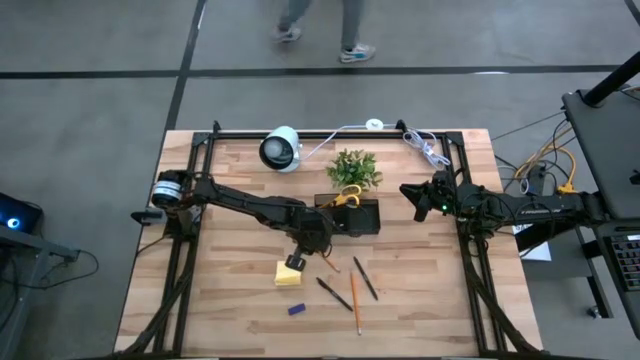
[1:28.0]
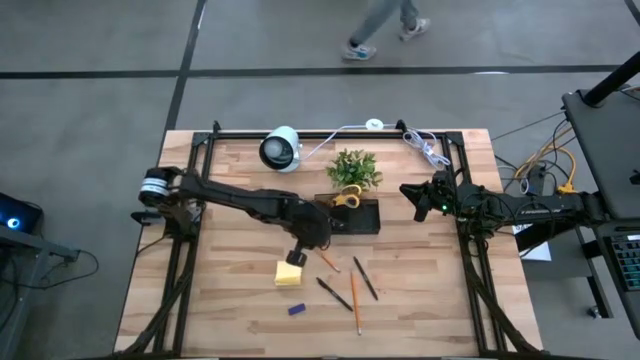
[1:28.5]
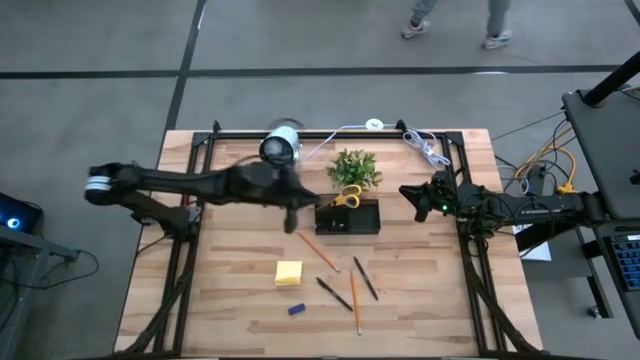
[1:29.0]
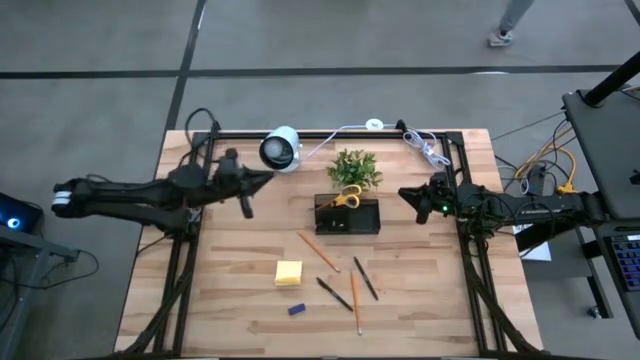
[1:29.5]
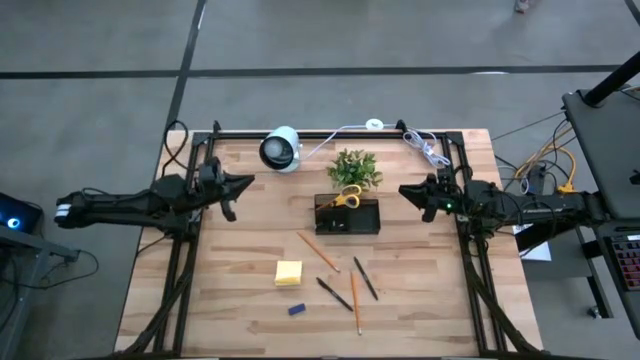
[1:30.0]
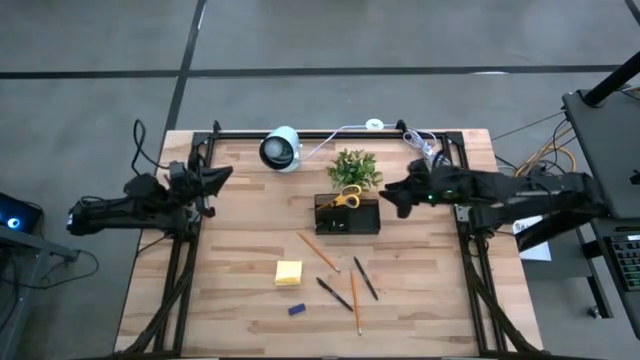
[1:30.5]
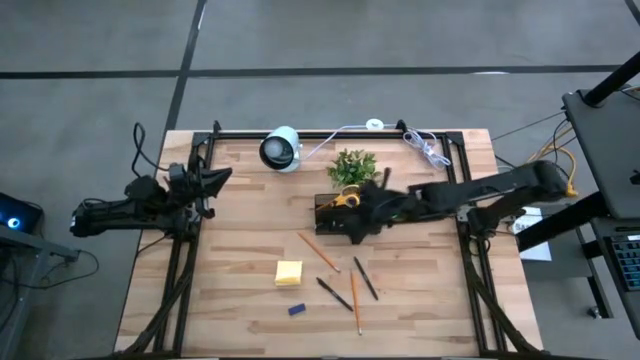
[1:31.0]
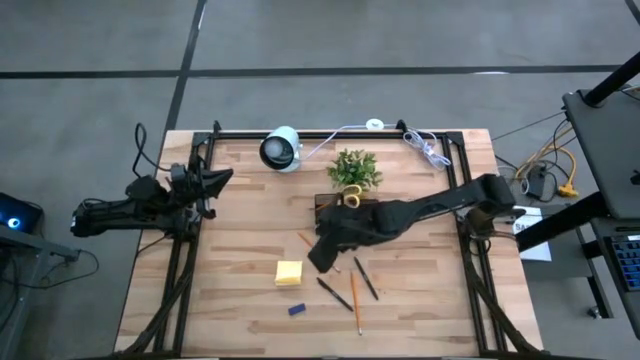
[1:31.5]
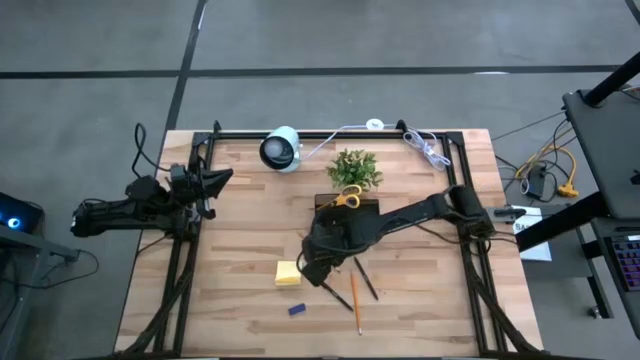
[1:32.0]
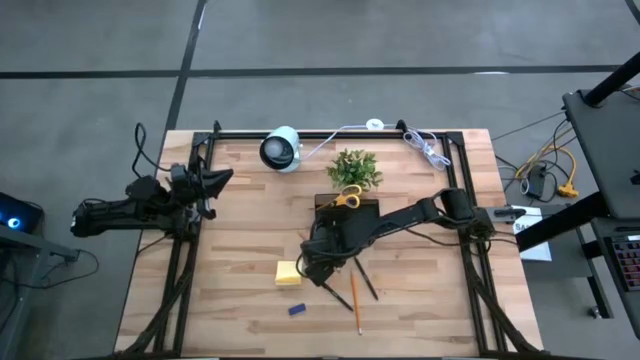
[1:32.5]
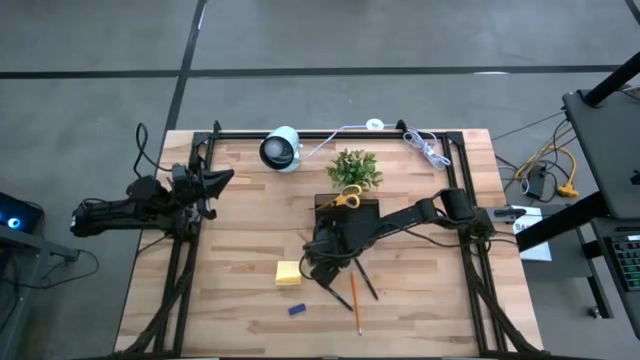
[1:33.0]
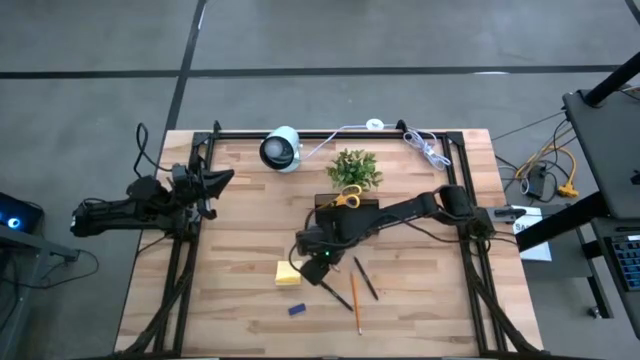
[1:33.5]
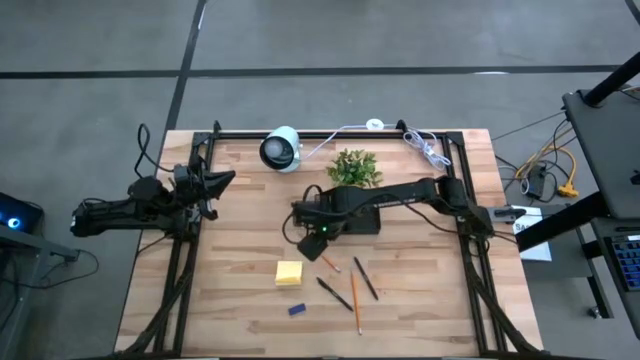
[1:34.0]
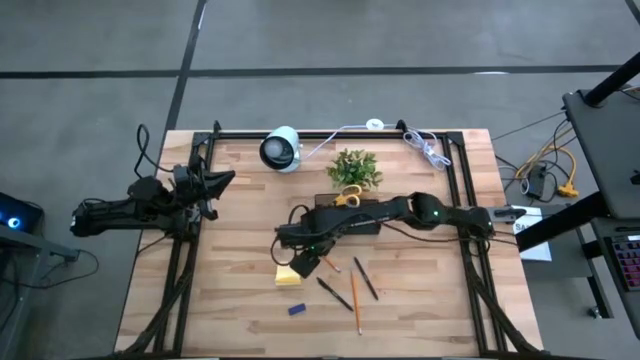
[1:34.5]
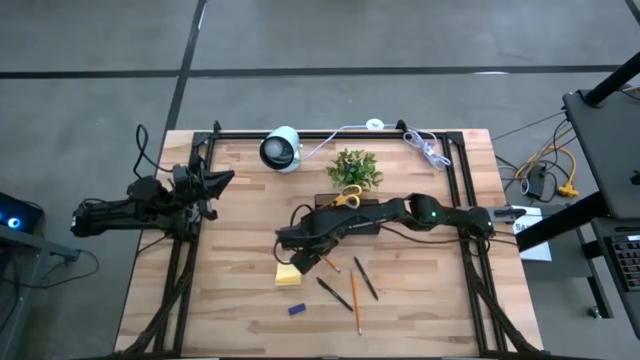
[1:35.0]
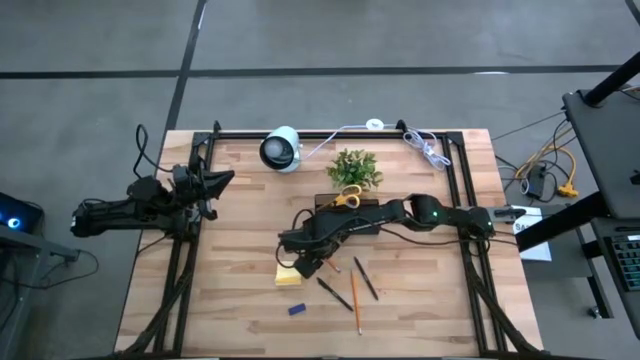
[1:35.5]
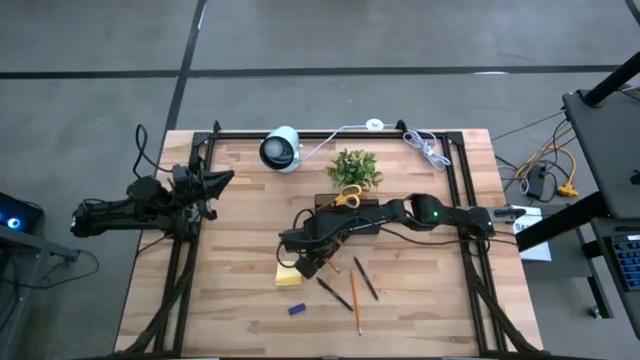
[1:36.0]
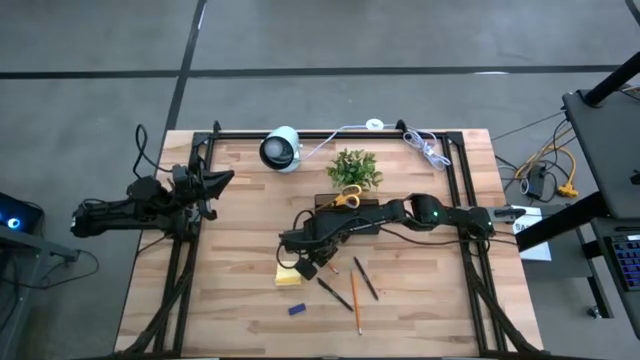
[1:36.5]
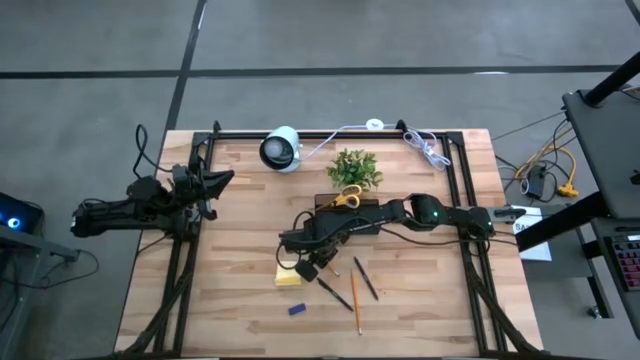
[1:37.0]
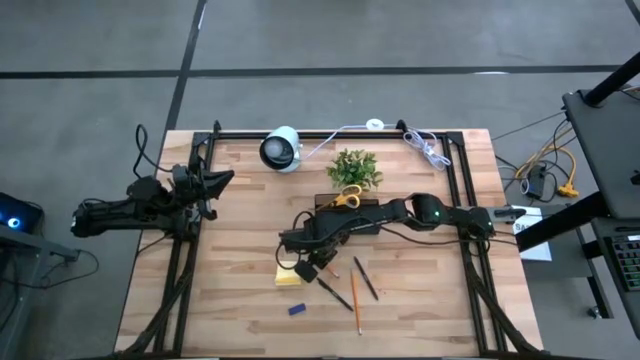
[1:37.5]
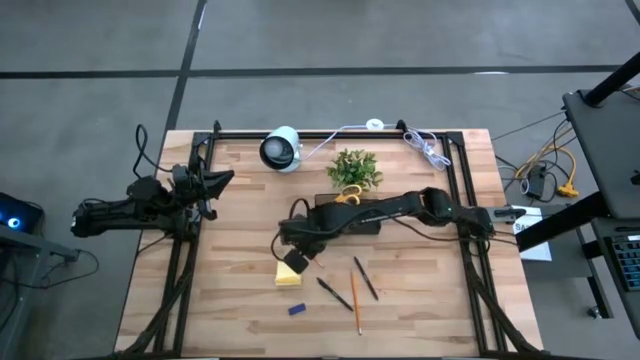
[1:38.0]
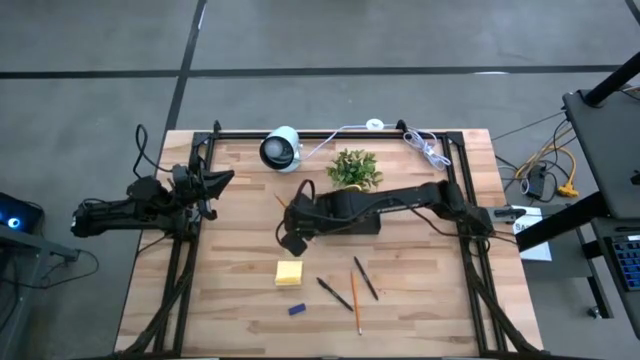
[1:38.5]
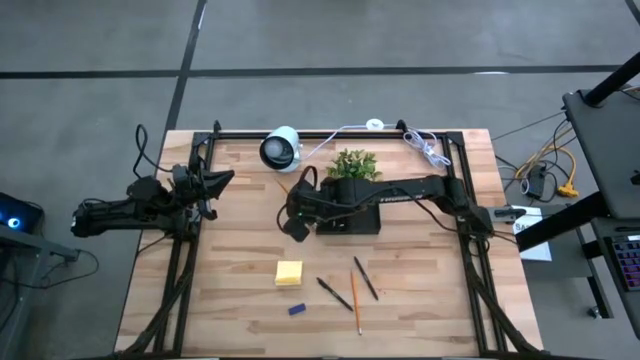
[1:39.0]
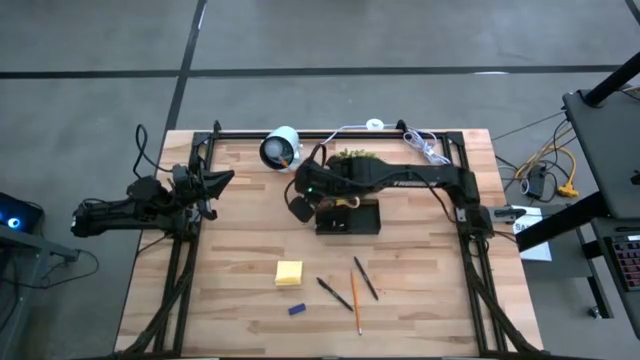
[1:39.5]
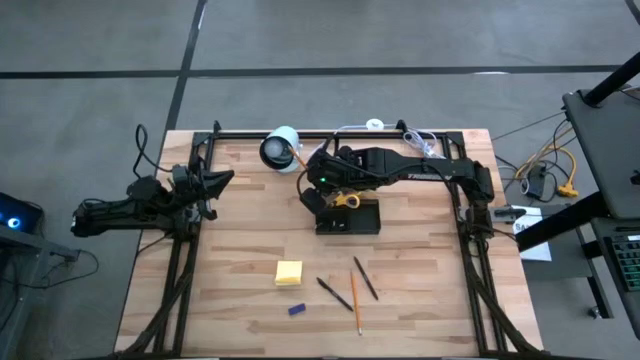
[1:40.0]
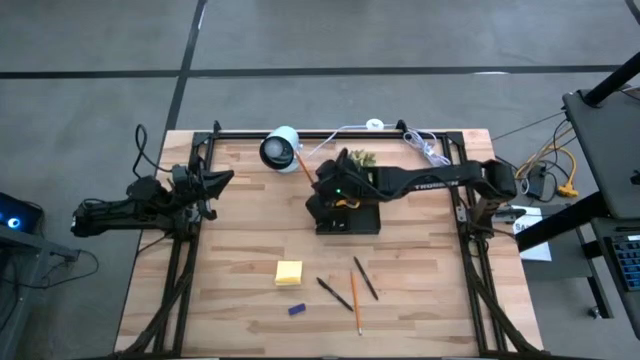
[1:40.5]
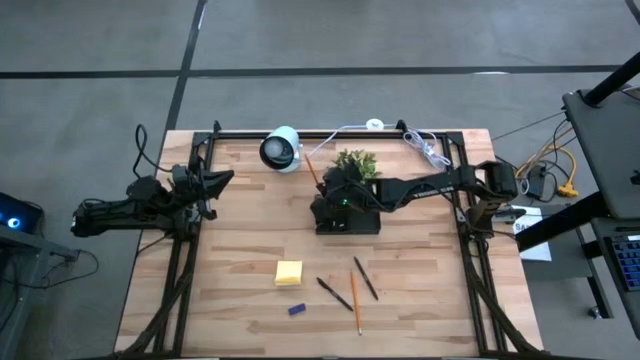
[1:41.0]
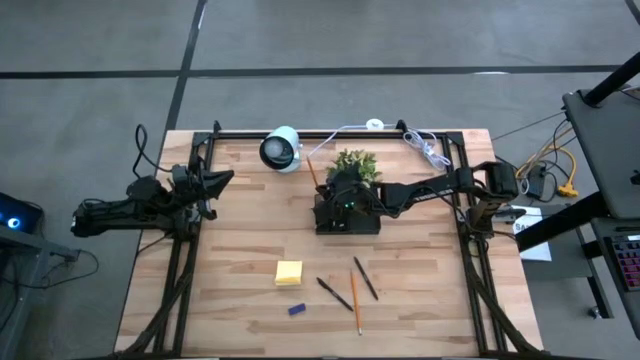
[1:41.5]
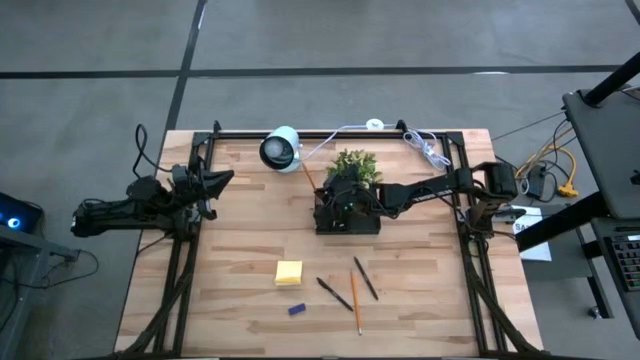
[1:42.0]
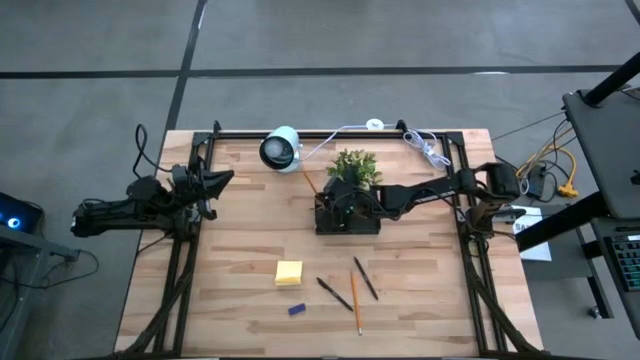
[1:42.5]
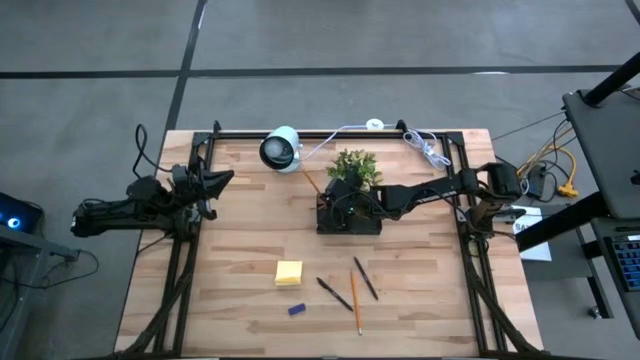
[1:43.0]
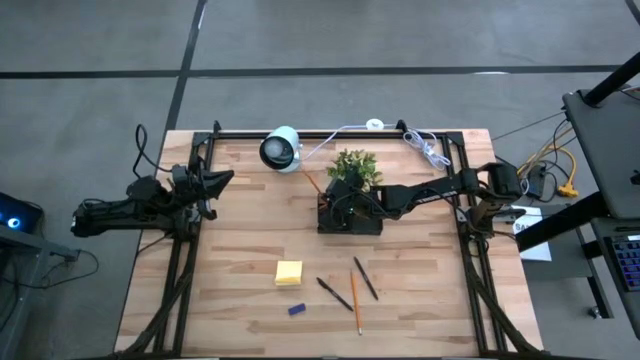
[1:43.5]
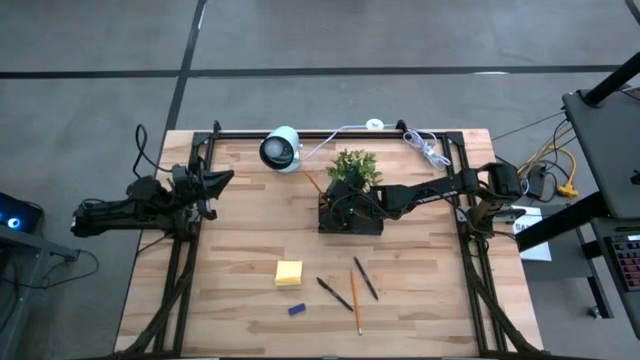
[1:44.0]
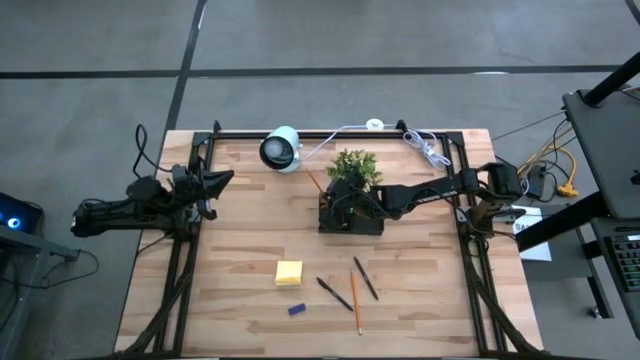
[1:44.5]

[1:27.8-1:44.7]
Task: Pick and place office supplies into organizer
Put the top orange pencil into the black desk organizer

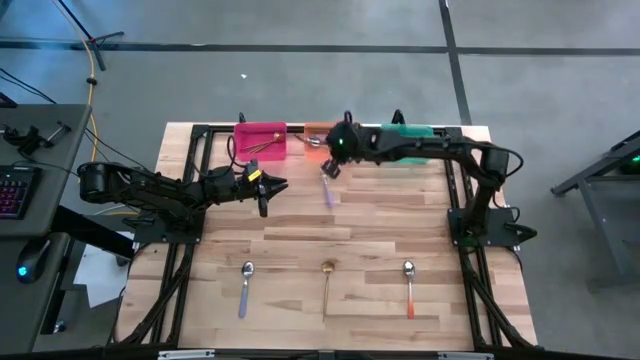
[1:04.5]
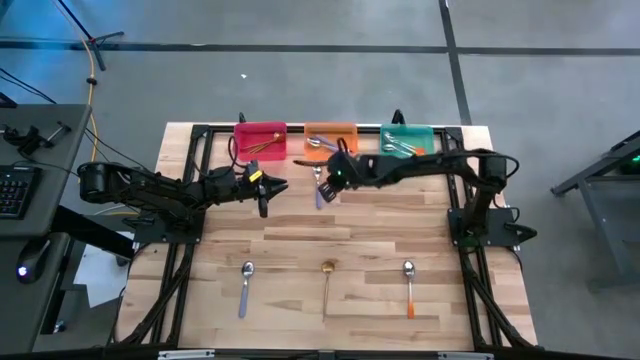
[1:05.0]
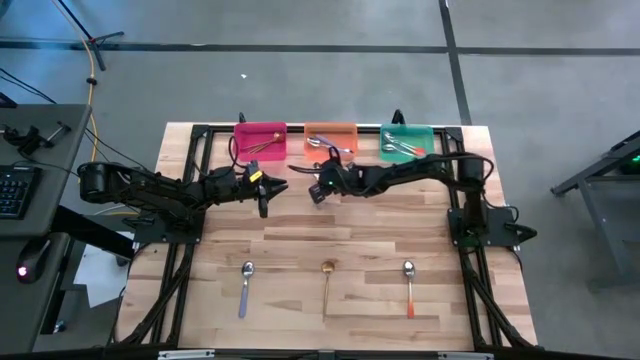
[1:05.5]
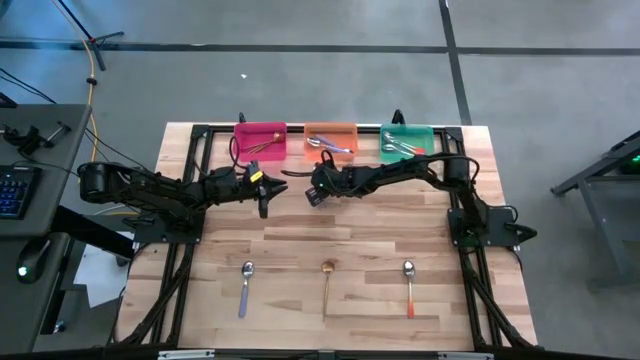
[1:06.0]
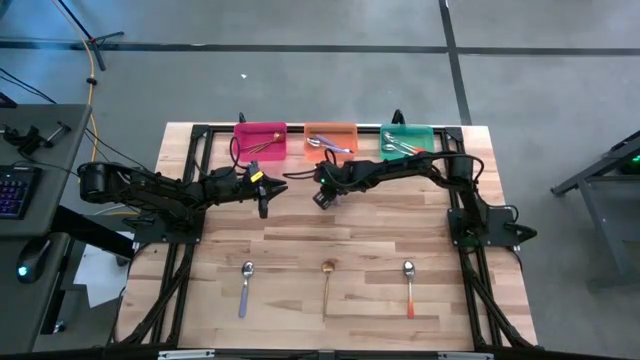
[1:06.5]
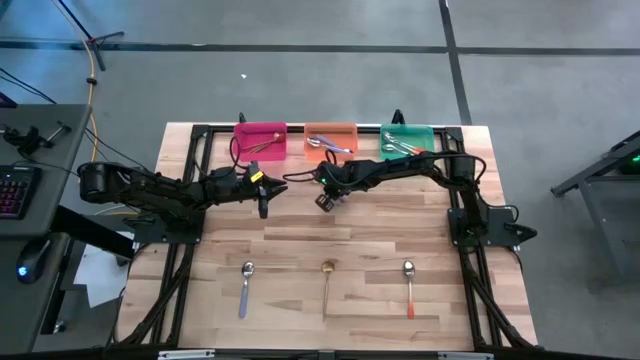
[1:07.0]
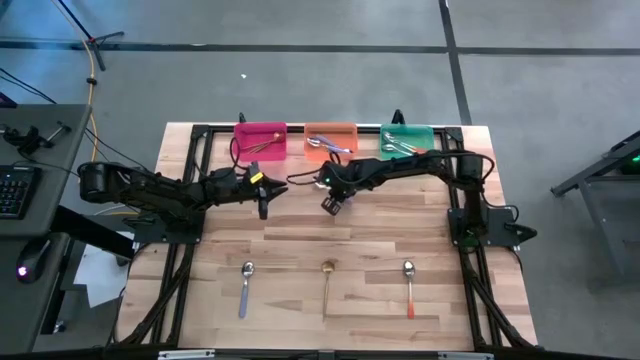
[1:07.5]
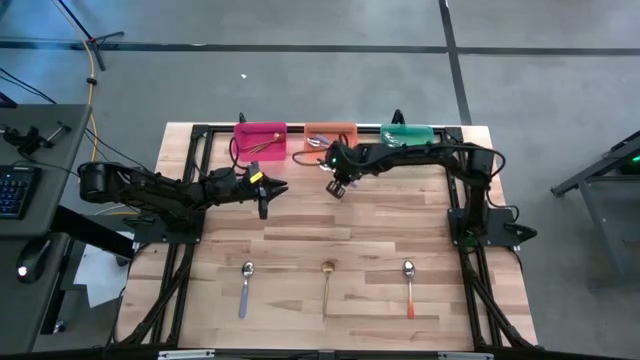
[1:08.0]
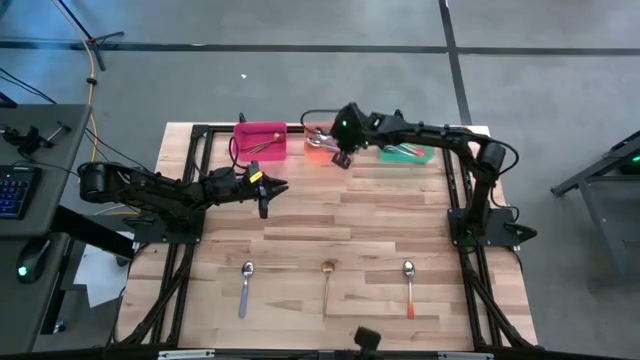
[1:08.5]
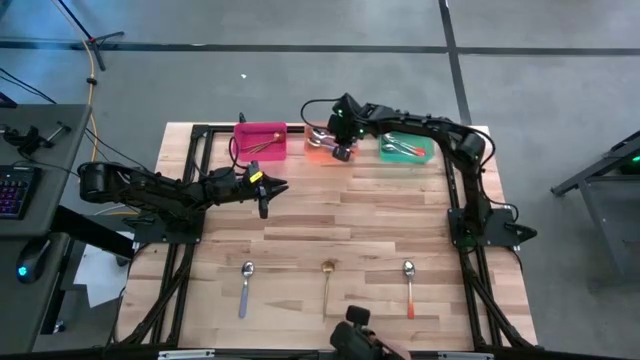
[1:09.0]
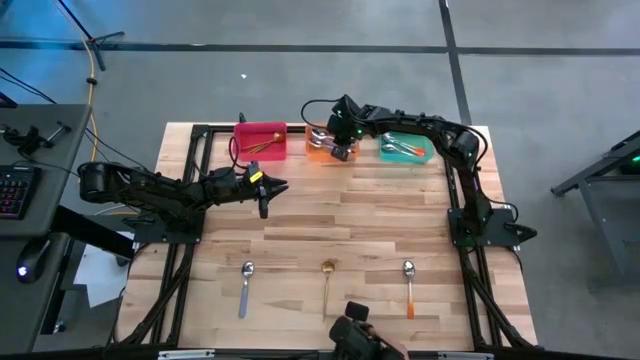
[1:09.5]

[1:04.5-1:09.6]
Task: Sort silverware by color (type)
Put the top light violet spoon into the orange bin
